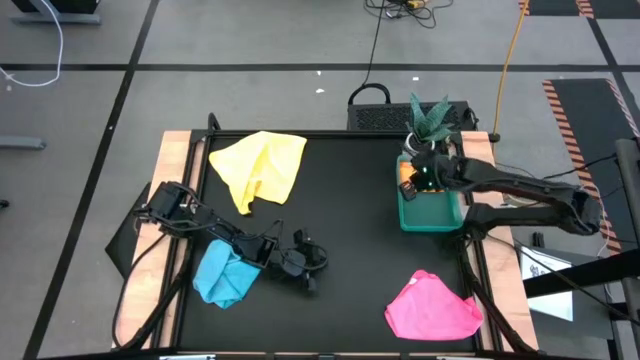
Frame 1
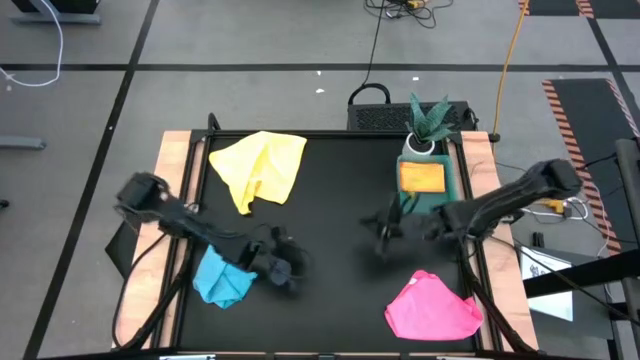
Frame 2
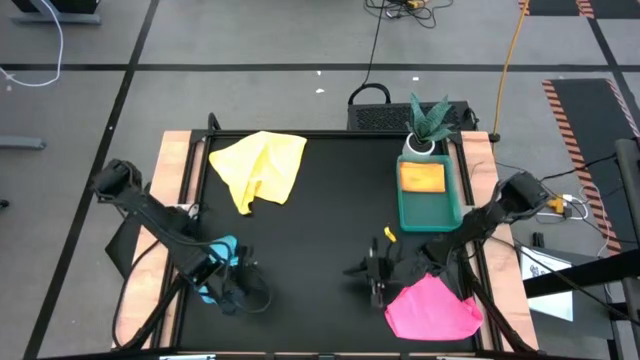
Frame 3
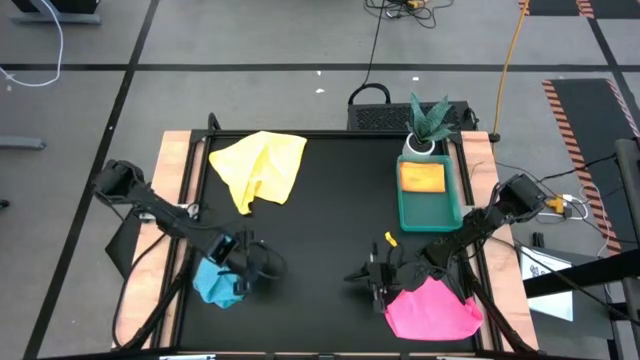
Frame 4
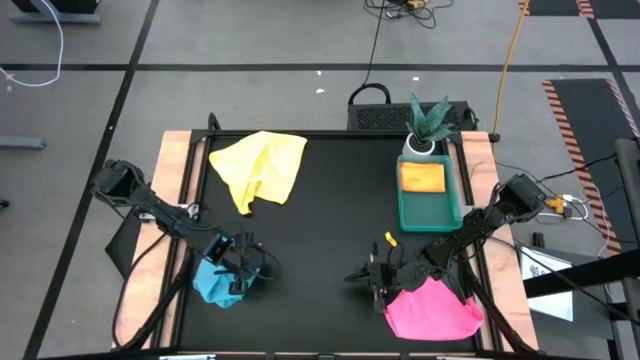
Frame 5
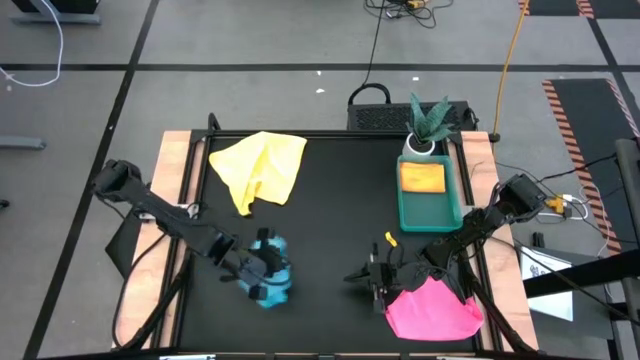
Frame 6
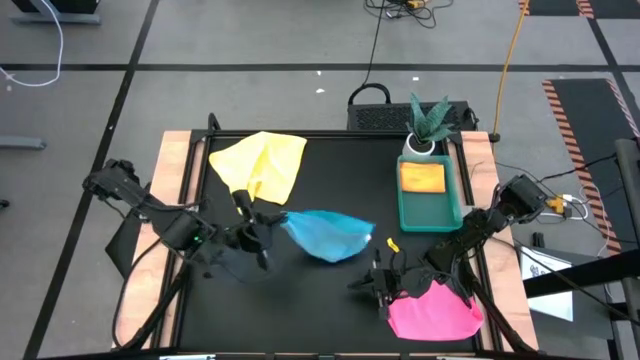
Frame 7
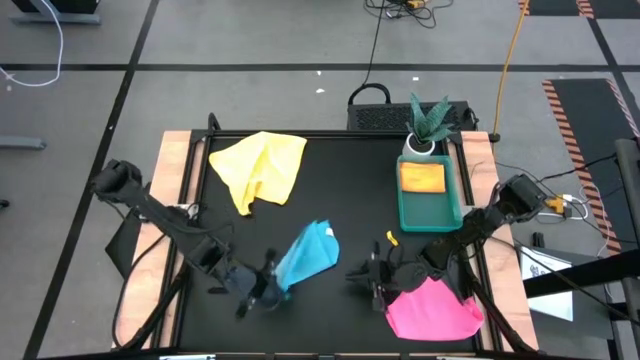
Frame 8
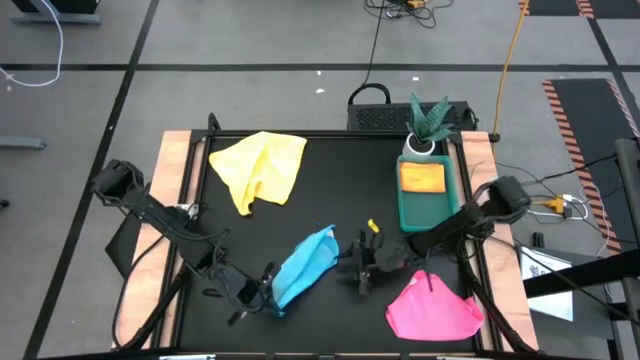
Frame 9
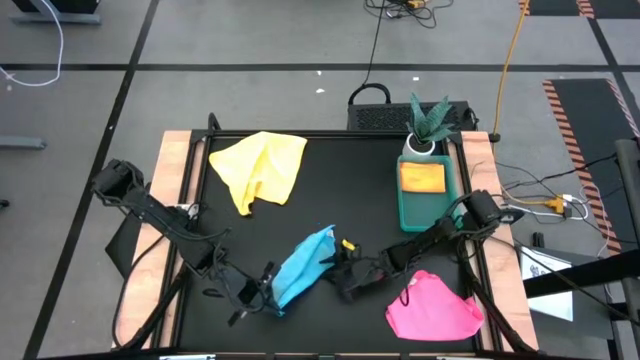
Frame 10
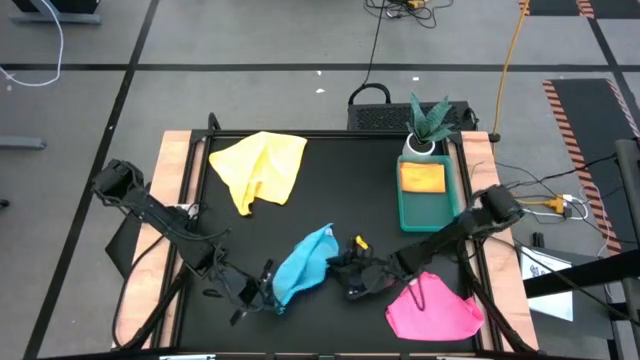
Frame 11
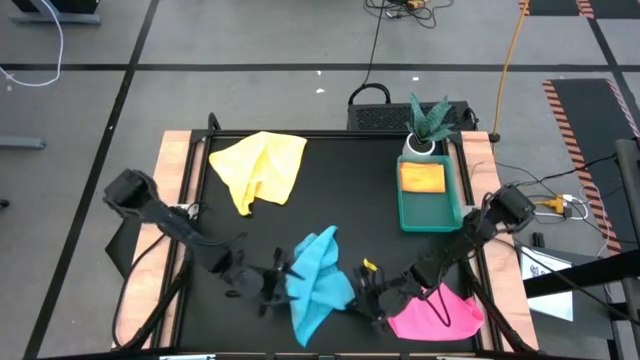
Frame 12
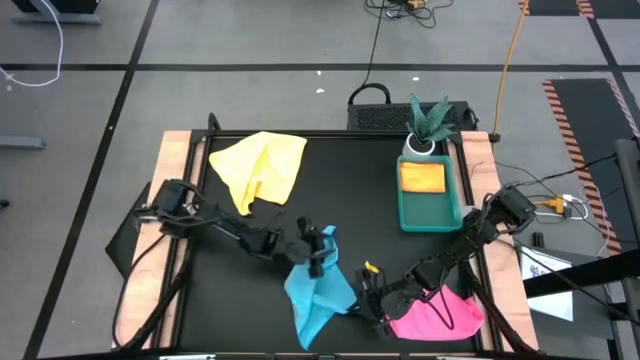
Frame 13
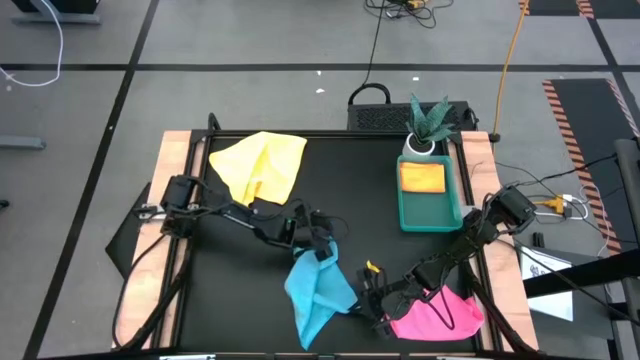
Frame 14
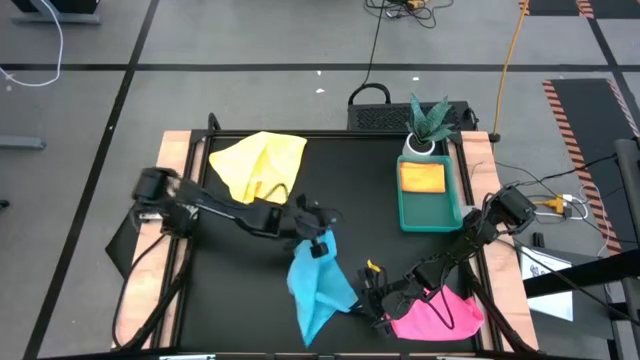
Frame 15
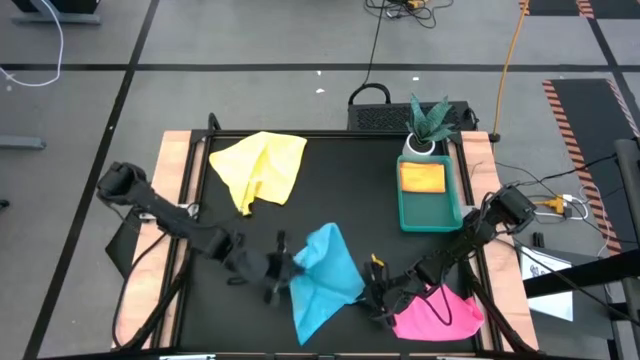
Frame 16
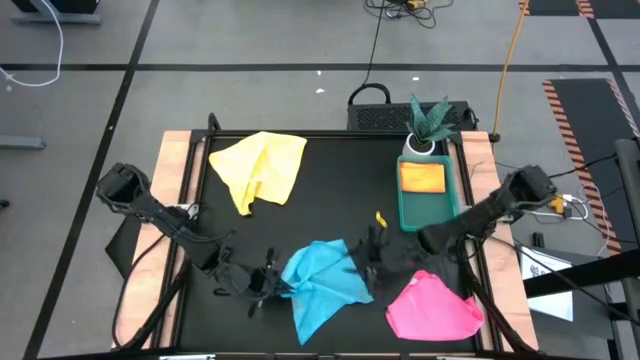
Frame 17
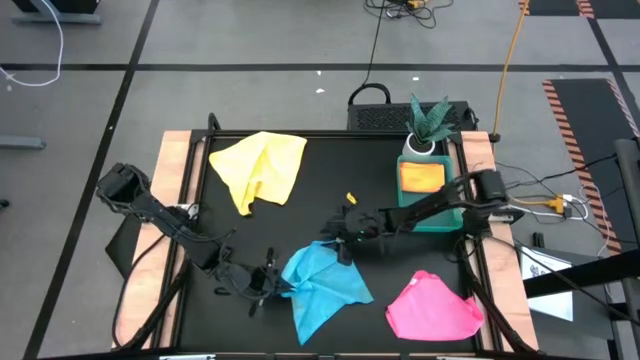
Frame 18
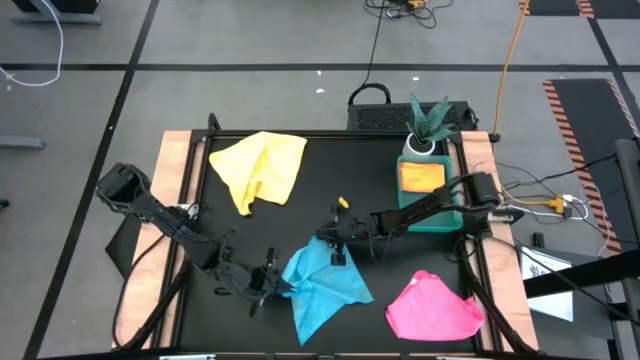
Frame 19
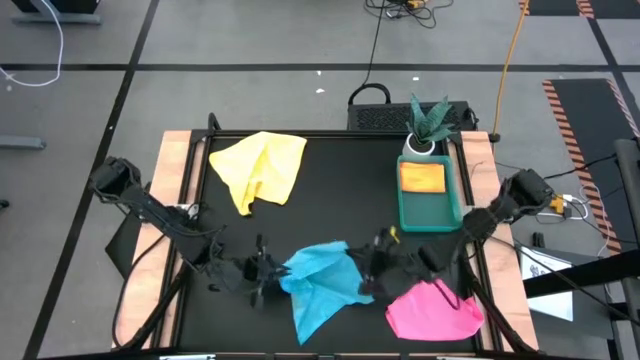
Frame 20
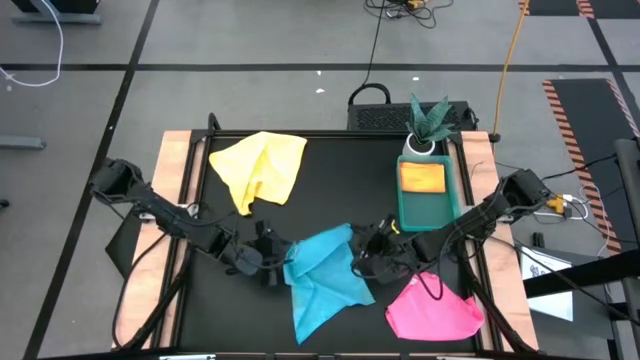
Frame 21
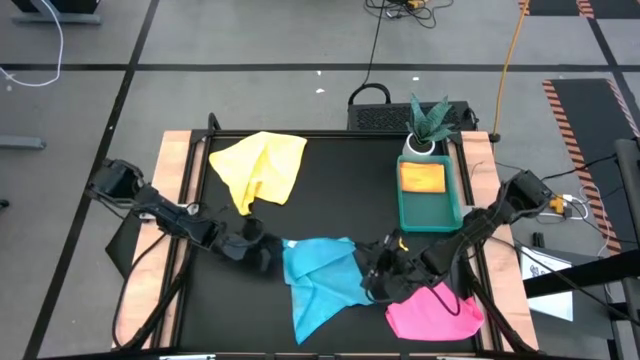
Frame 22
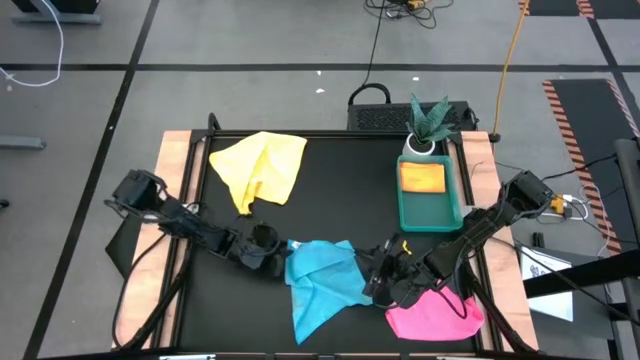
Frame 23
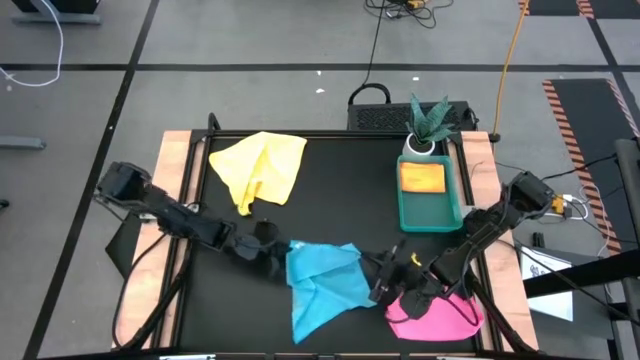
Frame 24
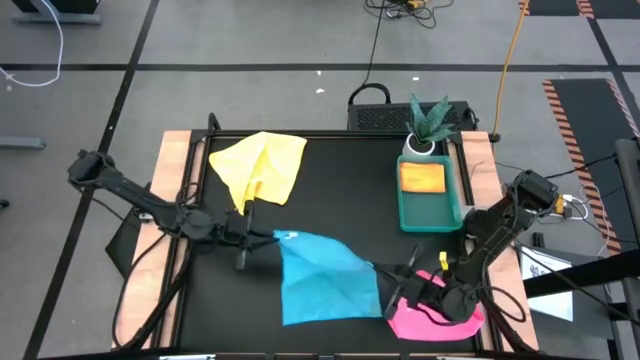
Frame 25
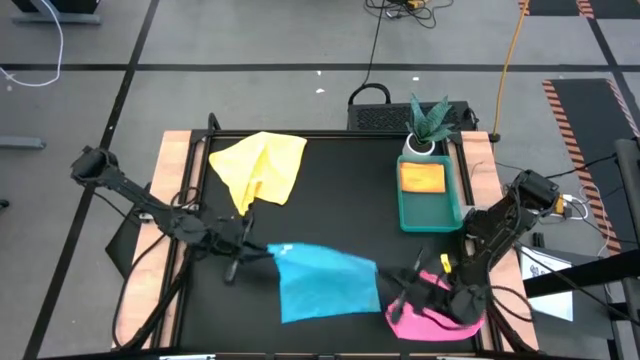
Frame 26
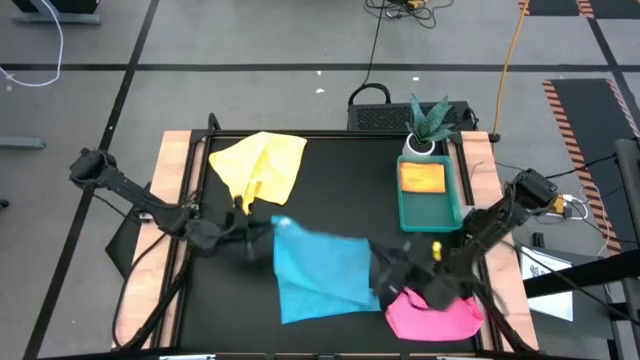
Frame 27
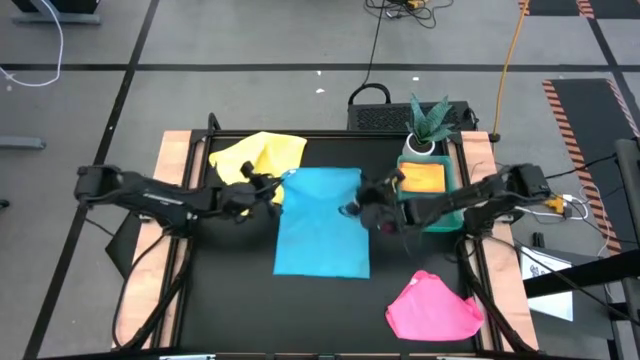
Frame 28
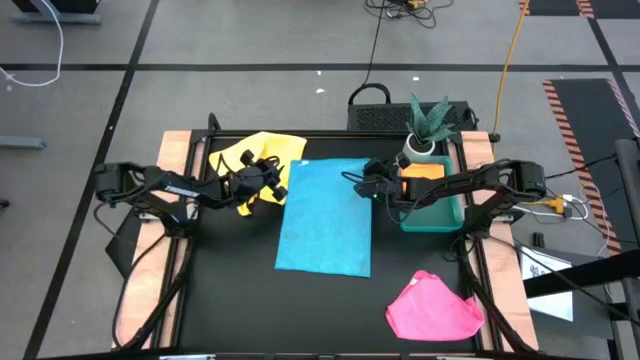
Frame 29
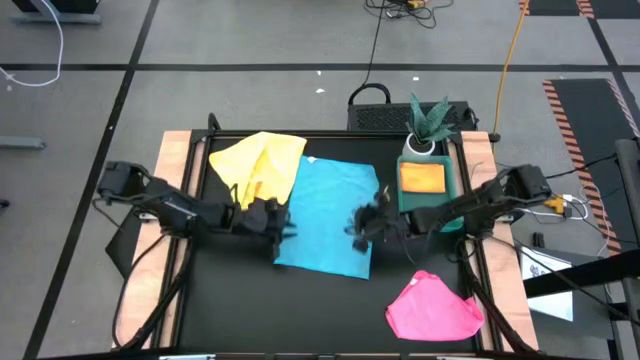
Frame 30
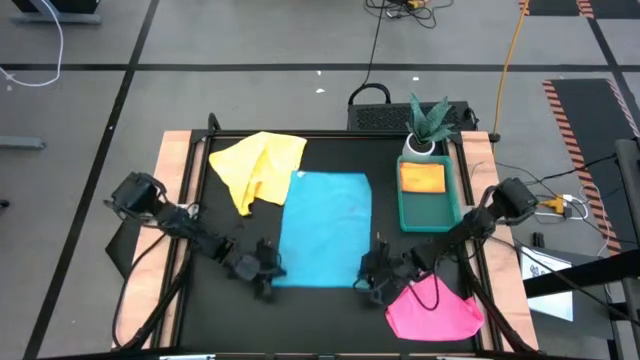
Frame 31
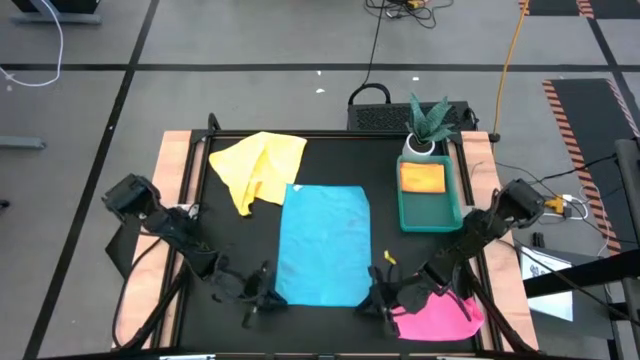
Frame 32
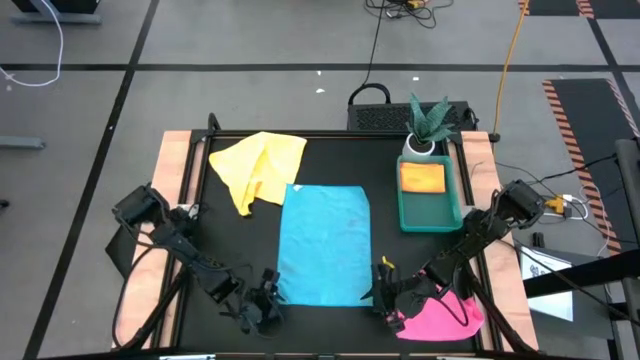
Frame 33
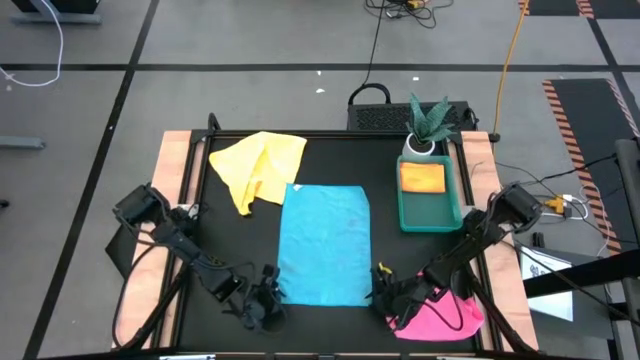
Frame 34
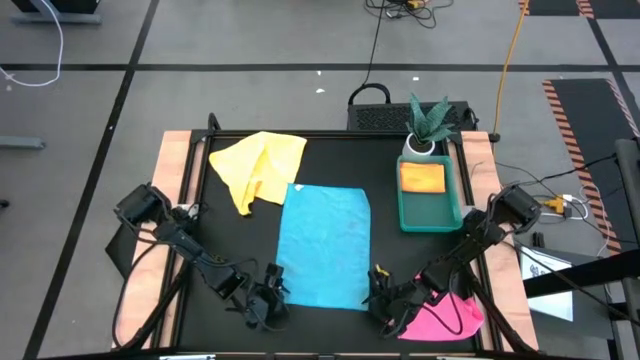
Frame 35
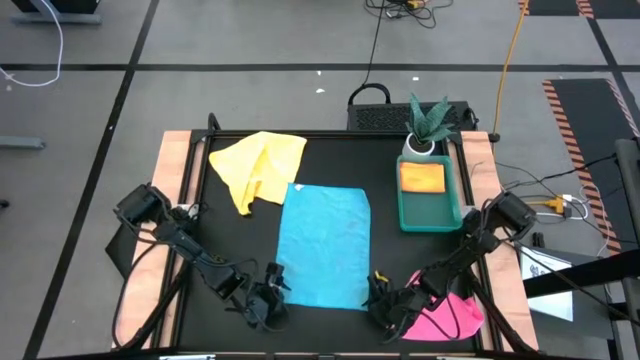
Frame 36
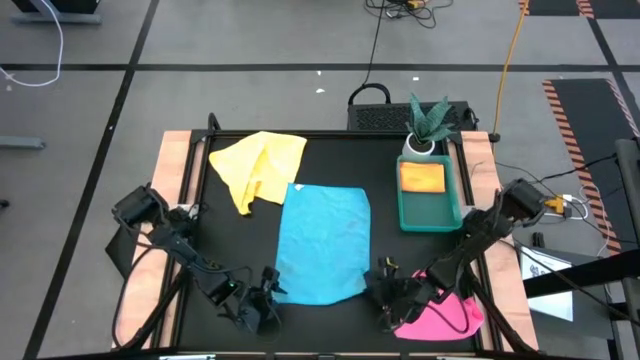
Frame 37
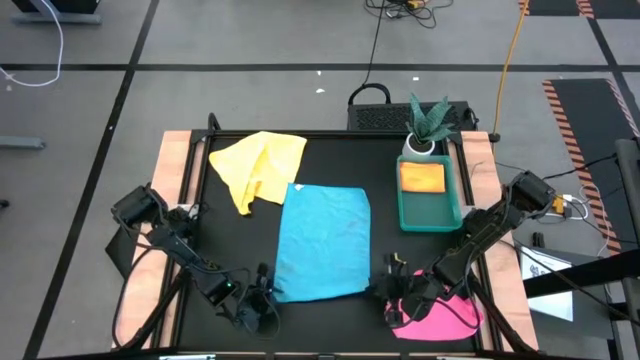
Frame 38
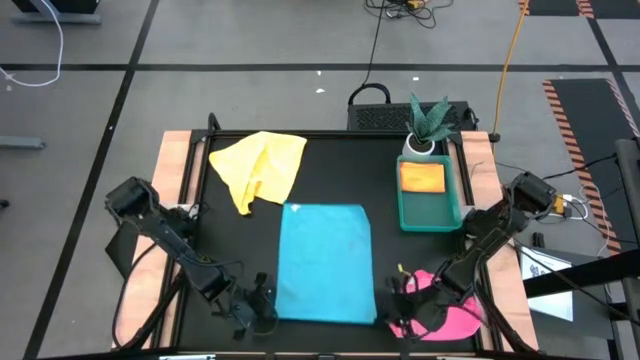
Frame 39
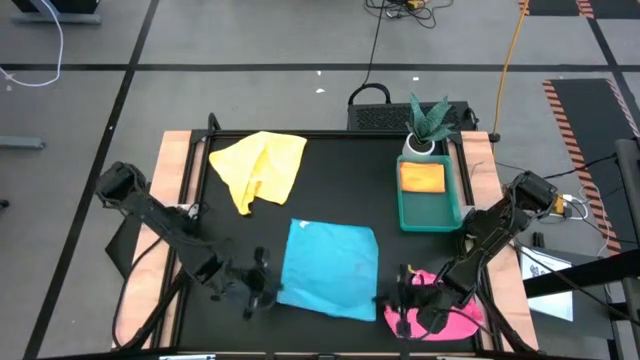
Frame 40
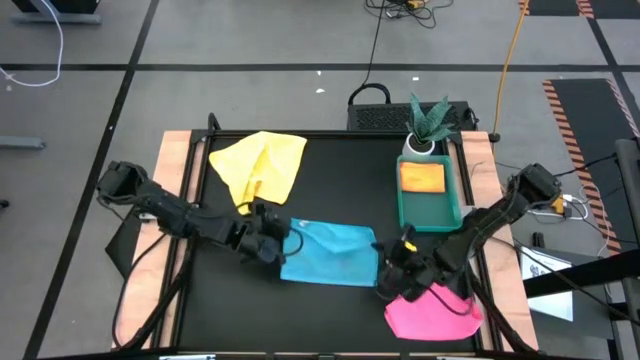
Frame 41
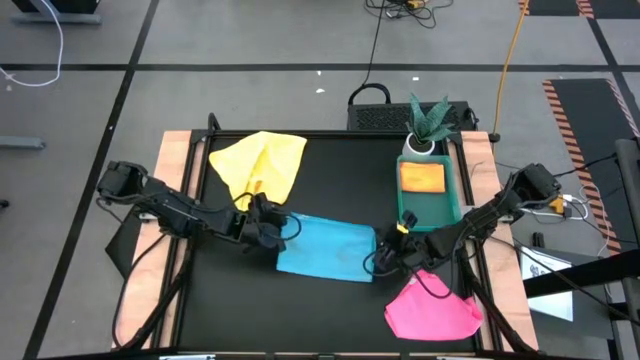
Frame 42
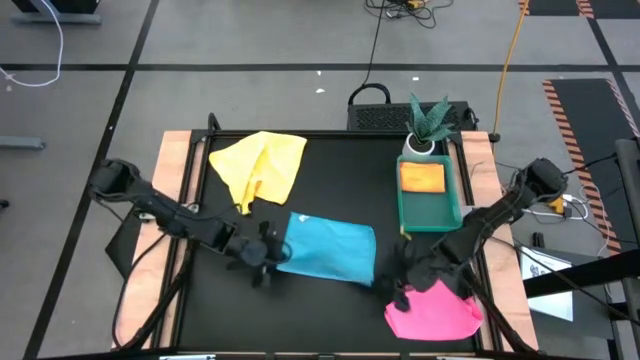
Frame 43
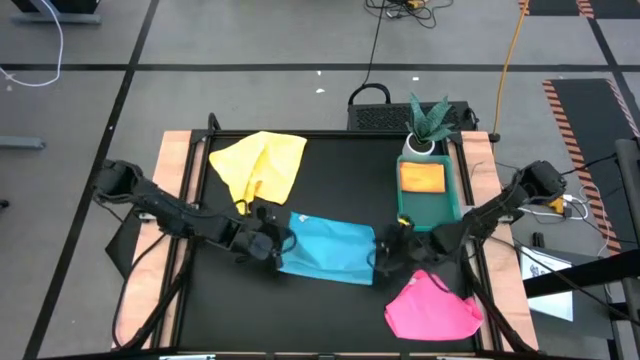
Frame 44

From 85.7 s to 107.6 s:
Task: Fold microfiber towels
Fold the blue microfiber cloth
